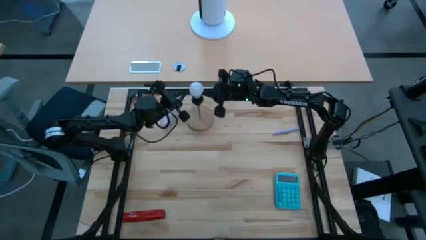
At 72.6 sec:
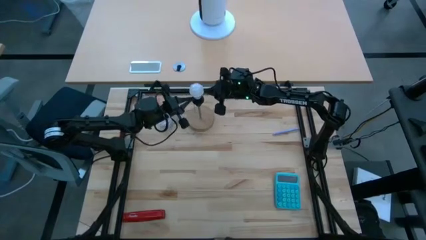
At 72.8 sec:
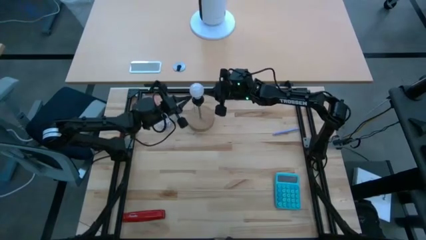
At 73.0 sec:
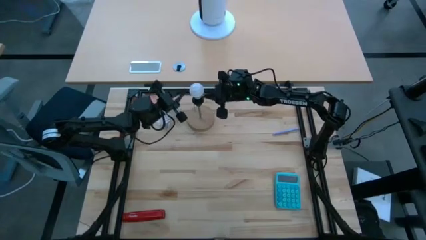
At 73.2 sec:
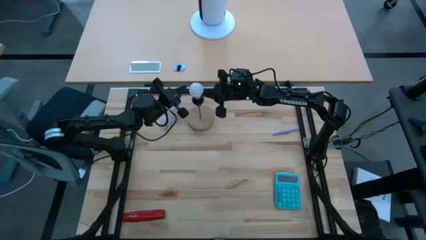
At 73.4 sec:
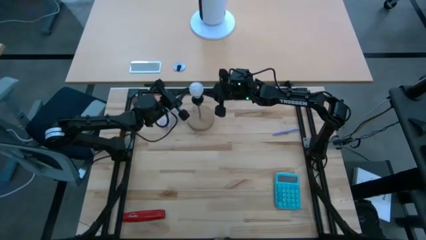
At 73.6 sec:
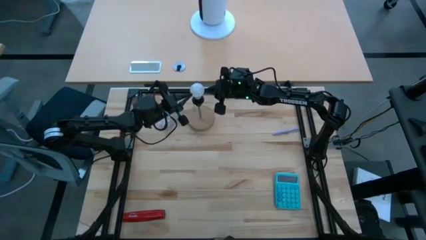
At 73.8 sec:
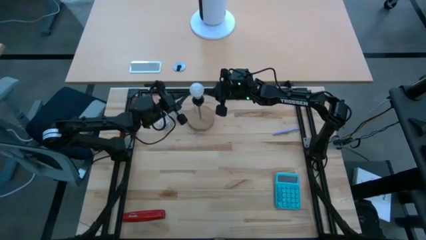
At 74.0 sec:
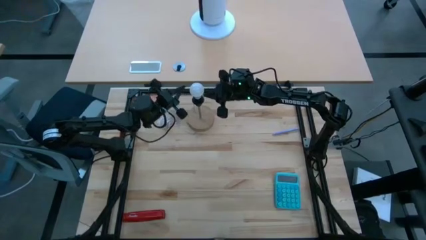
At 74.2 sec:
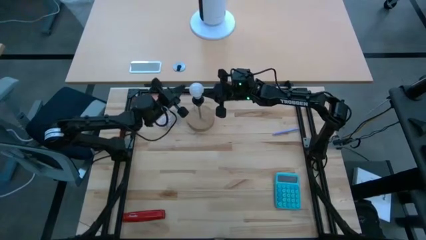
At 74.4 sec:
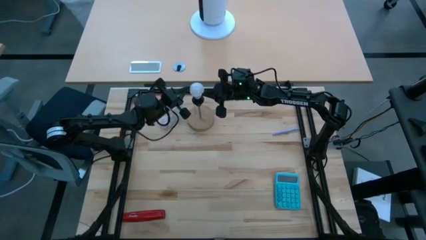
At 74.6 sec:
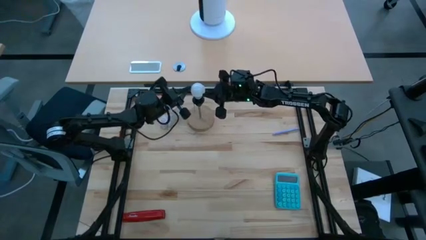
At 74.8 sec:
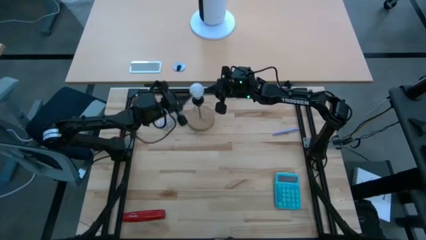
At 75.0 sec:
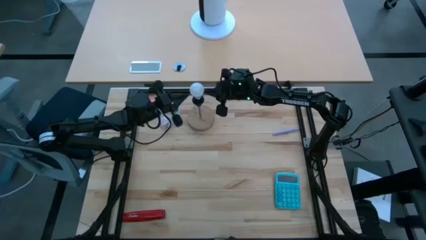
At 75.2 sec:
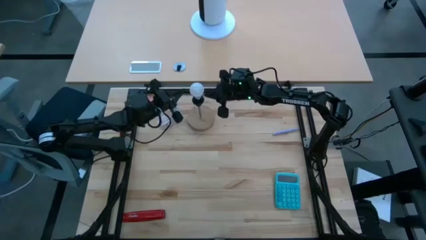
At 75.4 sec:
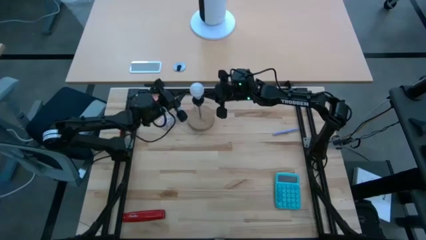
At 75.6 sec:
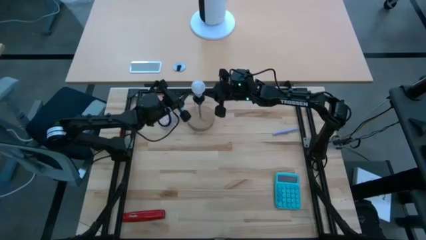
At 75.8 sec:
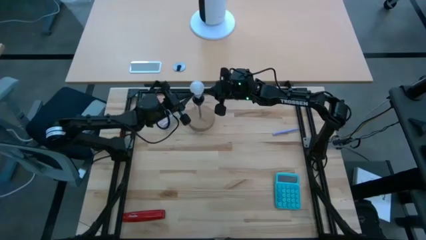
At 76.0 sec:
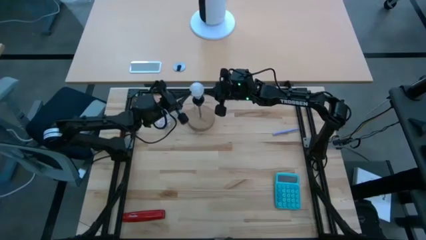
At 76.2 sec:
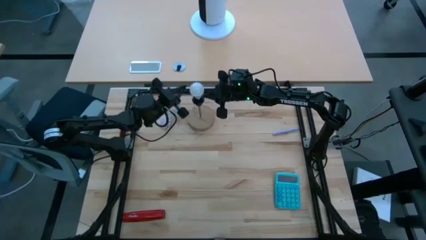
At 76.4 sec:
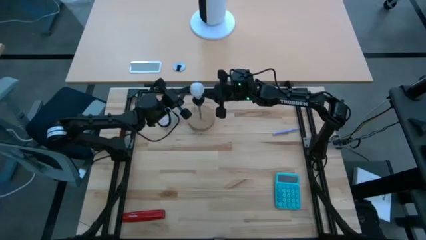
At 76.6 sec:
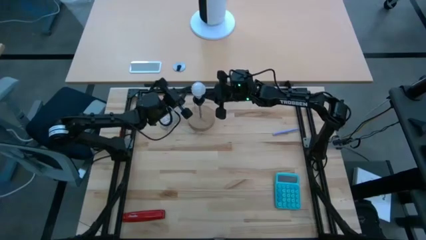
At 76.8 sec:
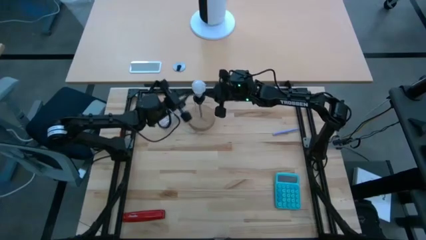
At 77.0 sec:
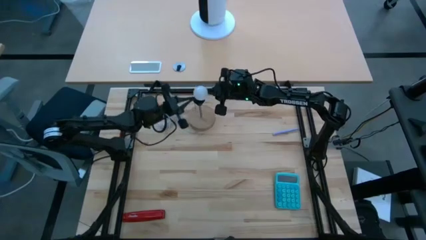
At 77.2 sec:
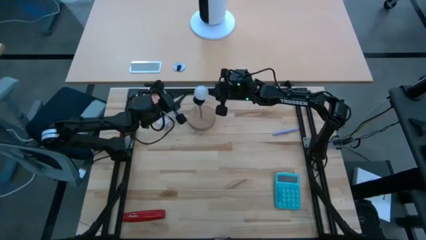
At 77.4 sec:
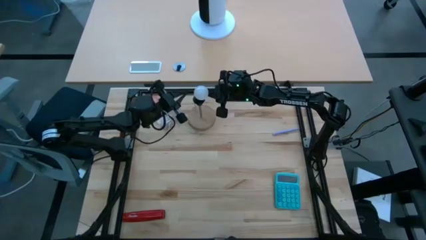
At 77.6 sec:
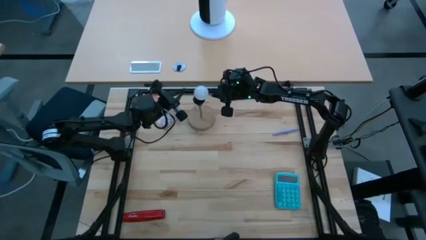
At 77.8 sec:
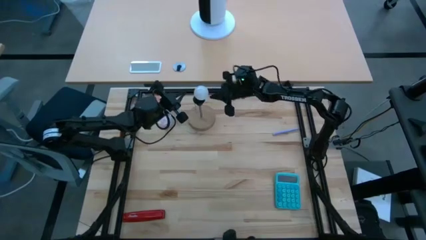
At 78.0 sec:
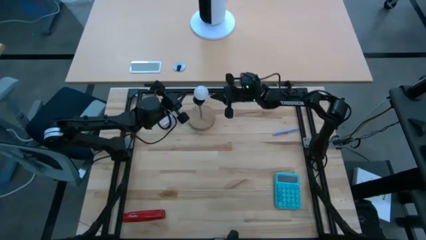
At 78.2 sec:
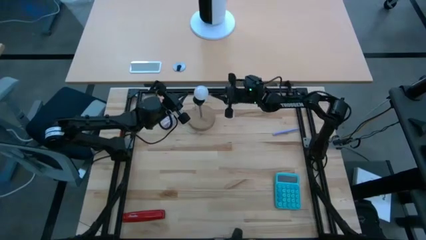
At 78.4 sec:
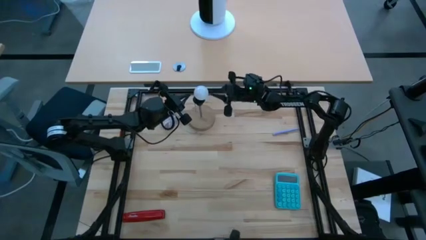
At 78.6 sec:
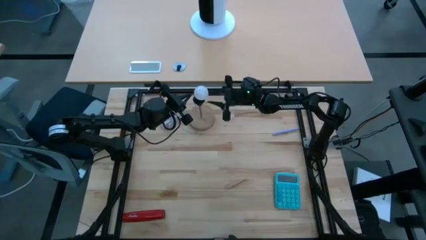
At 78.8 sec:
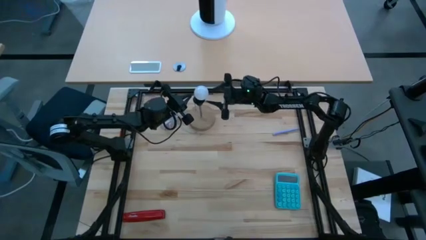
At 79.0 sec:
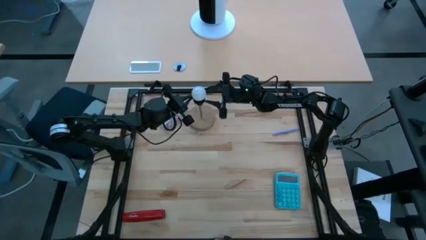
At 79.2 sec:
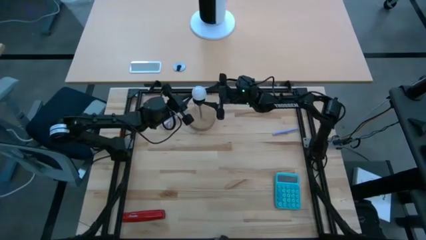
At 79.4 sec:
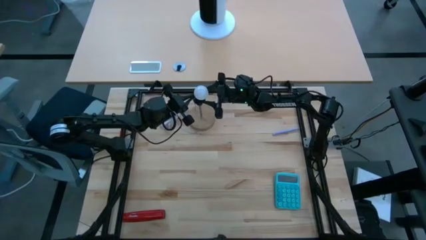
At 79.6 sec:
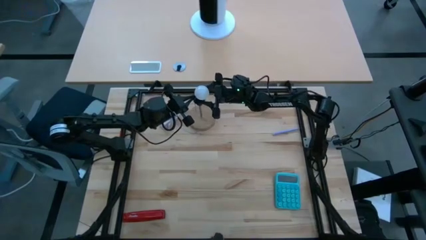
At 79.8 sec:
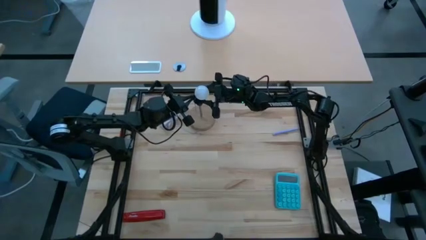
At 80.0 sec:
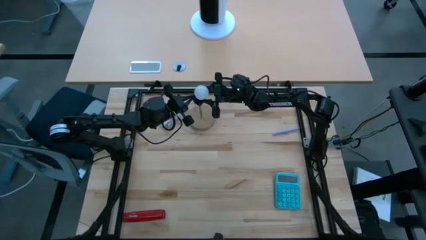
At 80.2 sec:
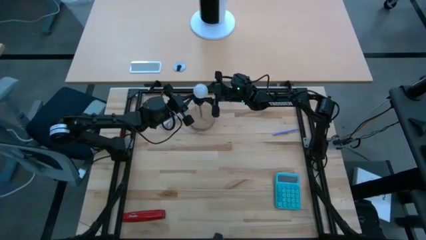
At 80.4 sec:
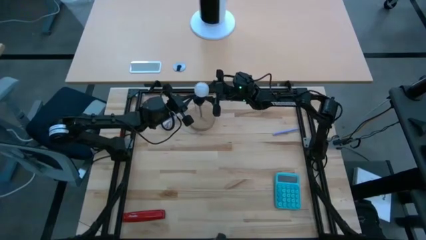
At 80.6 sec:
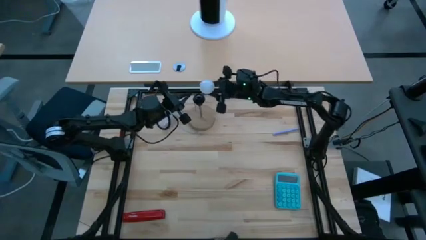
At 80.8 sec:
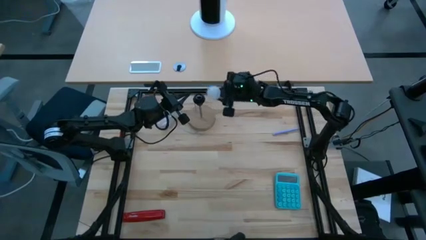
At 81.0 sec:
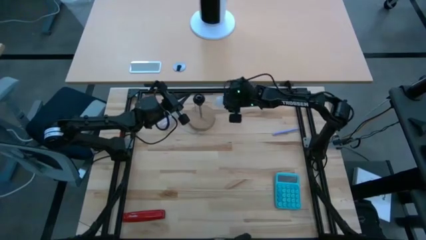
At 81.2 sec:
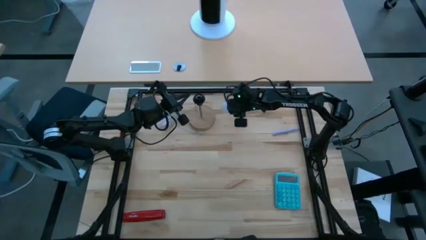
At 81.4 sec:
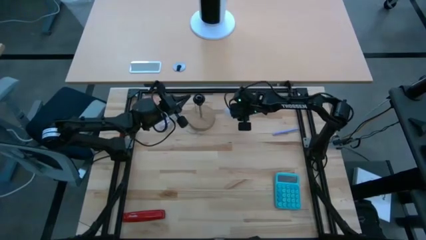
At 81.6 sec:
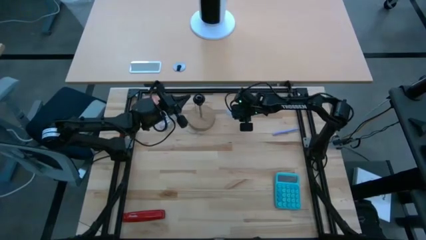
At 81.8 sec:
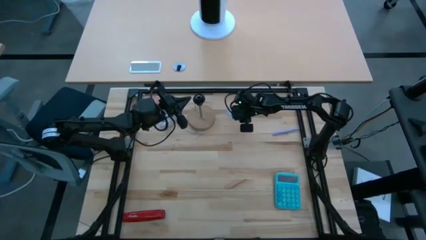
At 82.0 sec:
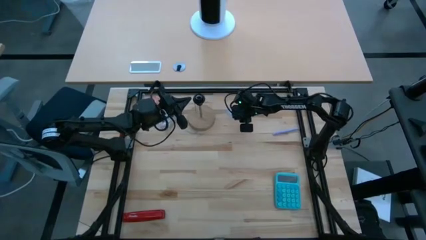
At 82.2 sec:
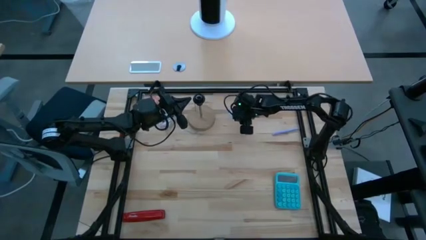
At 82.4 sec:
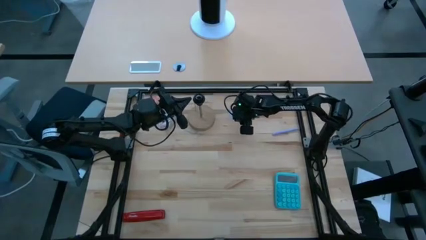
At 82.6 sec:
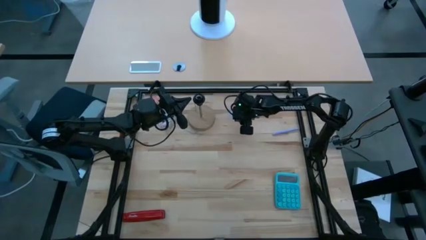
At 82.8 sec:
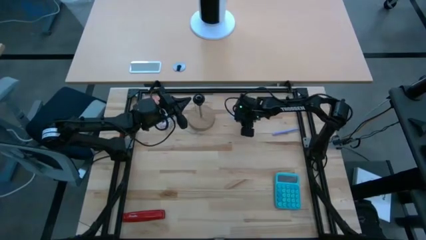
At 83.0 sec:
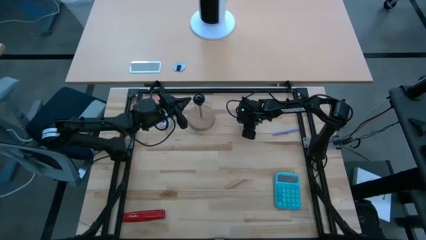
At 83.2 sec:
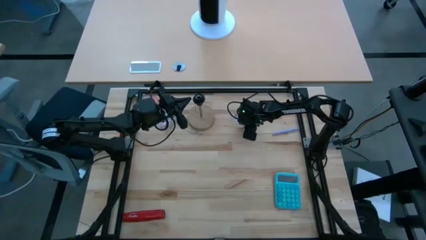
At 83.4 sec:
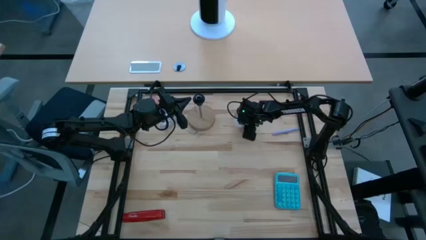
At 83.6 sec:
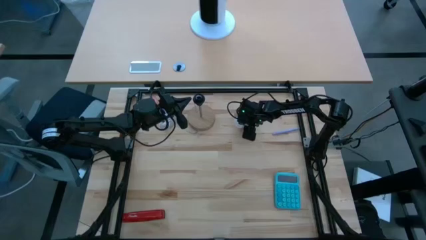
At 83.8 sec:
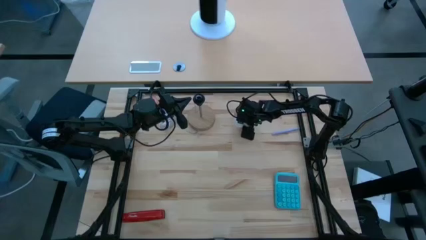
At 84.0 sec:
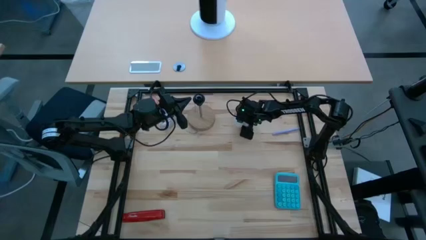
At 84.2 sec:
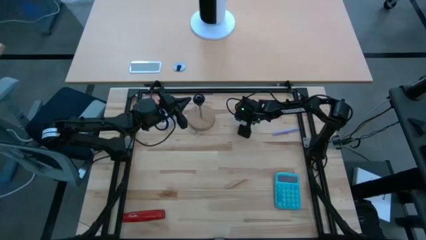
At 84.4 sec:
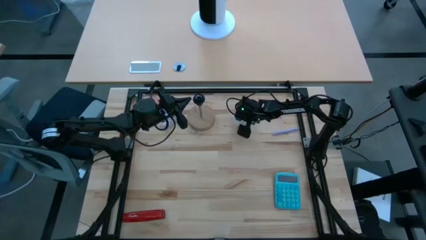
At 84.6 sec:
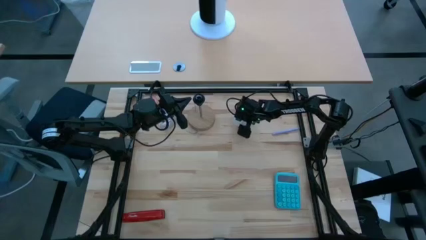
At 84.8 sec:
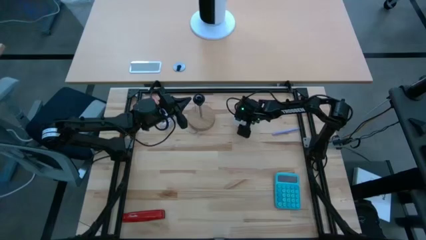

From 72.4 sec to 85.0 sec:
Task: Screw lightbulb
Remove the lightbulb from the wooden table lamp

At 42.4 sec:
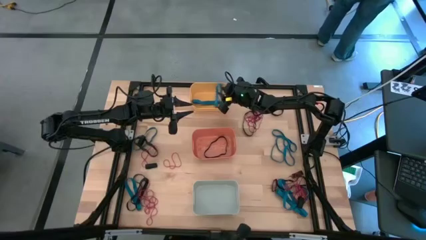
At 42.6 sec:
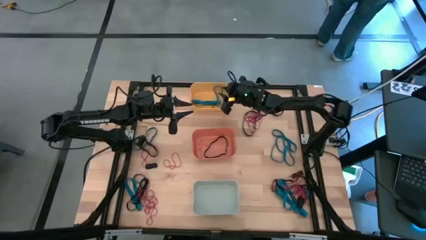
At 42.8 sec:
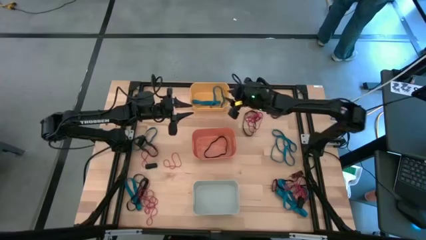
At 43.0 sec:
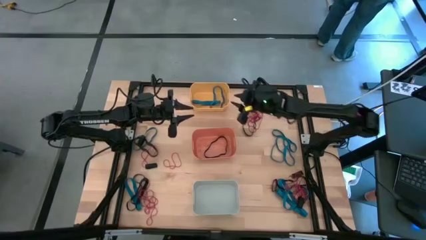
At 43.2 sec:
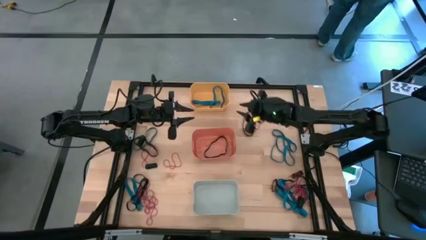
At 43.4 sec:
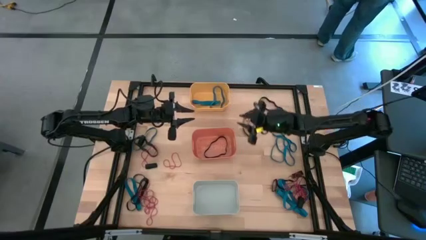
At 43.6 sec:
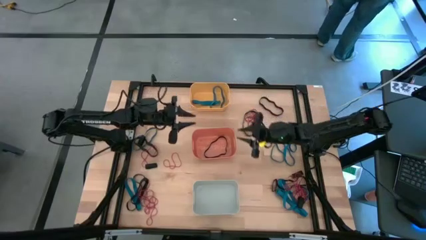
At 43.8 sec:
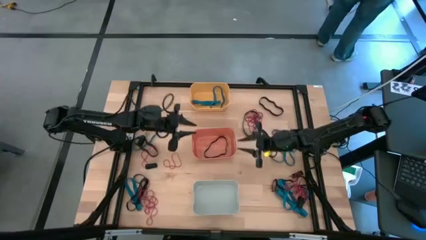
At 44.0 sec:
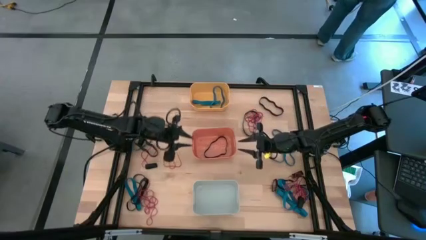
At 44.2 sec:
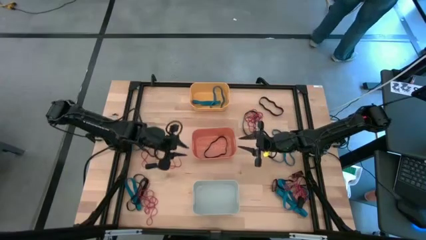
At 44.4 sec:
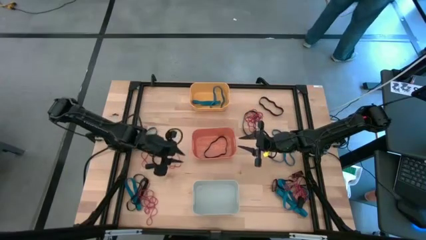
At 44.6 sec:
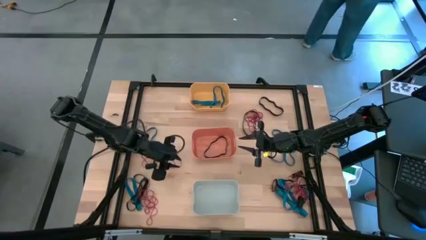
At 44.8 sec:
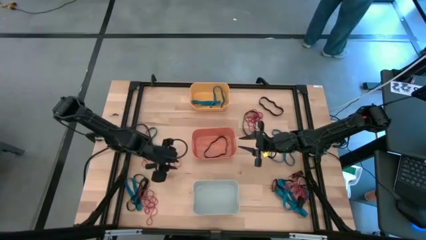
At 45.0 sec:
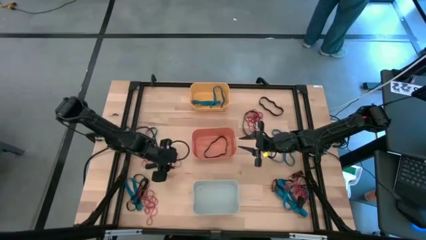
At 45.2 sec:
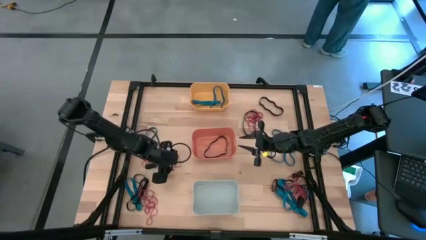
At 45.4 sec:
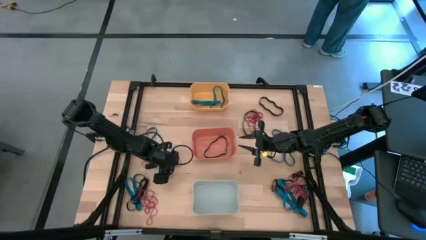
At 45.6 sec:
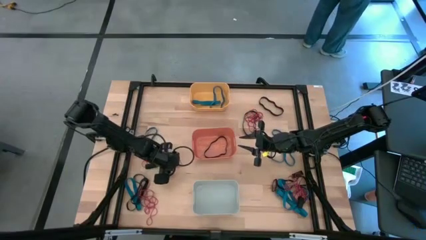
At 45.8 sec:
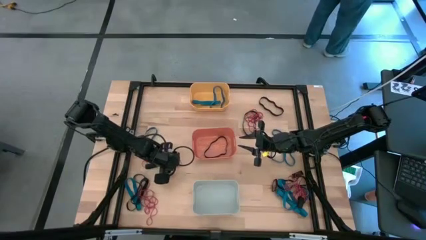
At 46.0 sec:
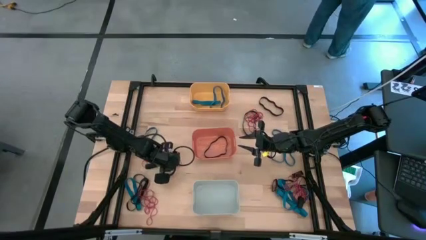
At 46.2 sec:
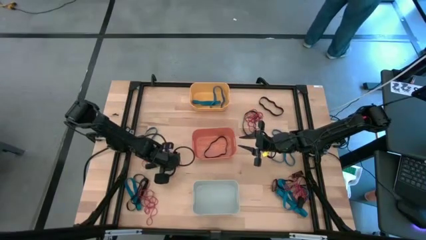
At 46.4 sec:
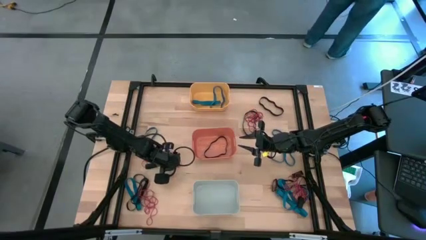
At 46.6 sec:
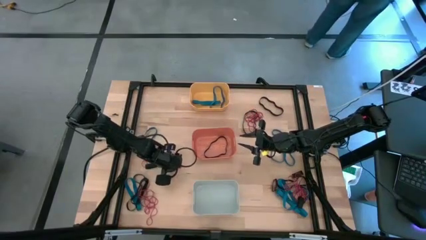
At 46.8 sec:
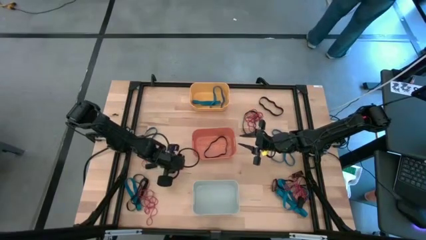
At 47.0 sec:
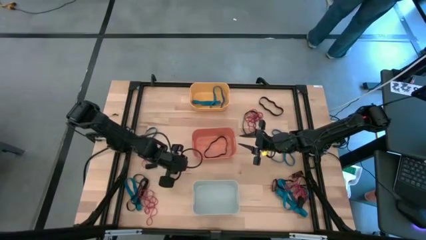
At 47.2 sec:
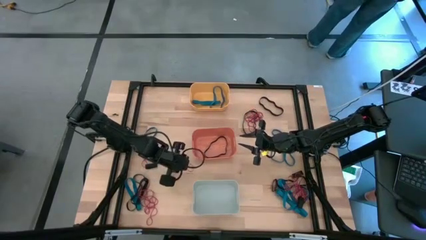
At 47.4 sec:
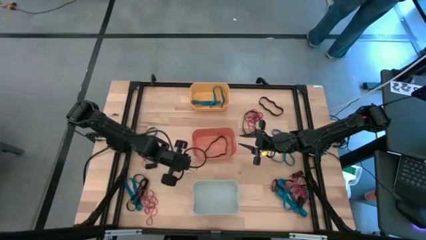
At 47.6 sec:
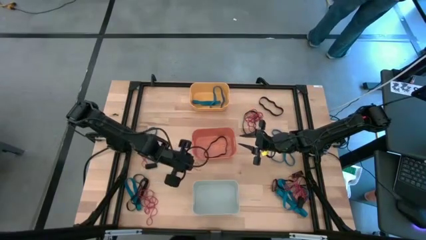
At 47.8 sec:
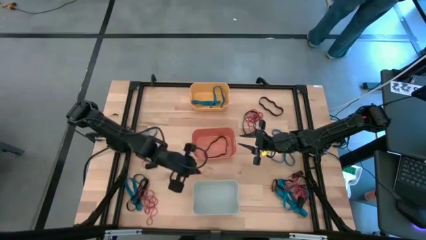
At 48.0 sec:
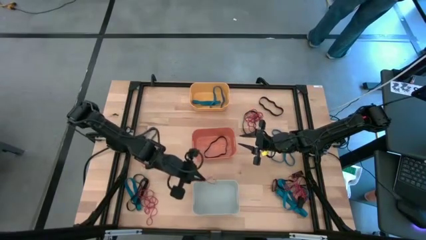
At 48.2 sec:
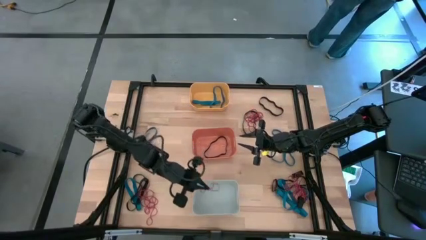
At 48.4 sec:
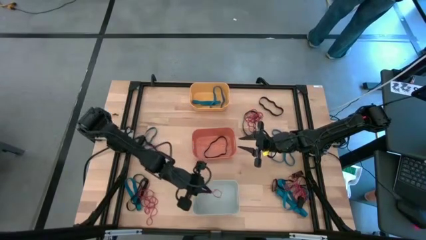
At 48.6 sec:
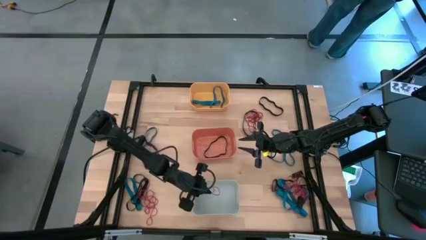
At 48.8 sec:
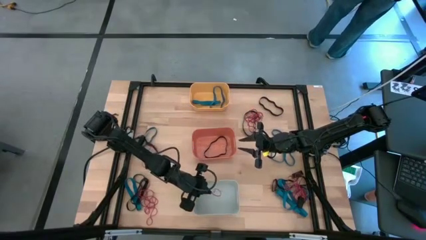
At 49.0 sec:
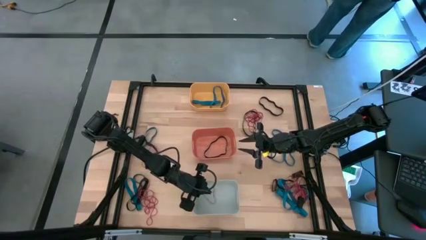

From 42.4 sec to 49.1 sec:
Task: Sort rubber bands into baskets
Put the red rubber band in the white bin
